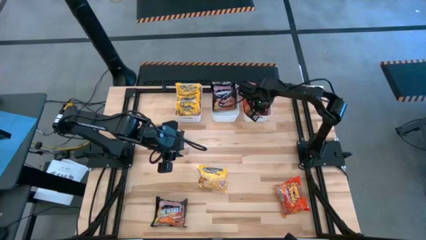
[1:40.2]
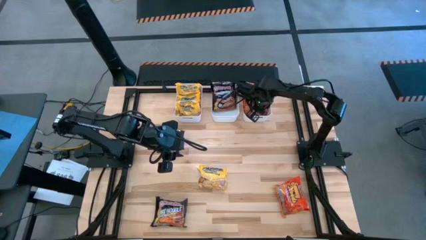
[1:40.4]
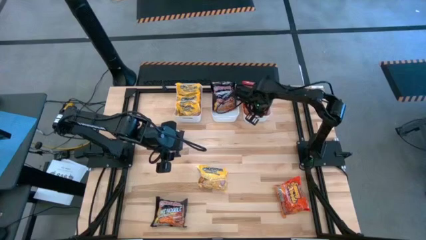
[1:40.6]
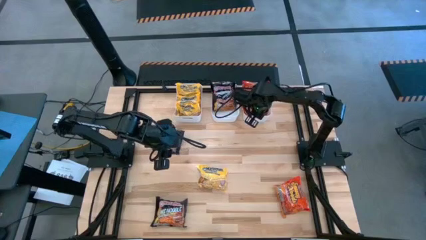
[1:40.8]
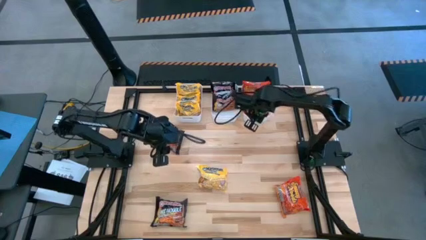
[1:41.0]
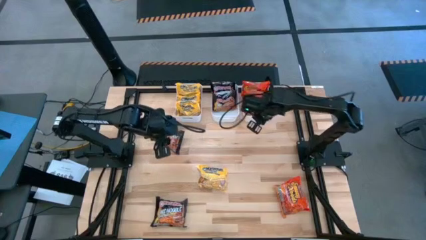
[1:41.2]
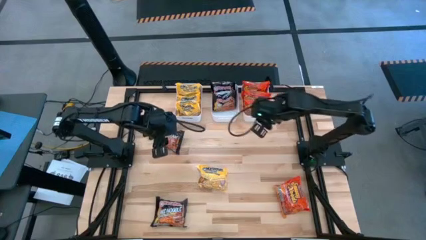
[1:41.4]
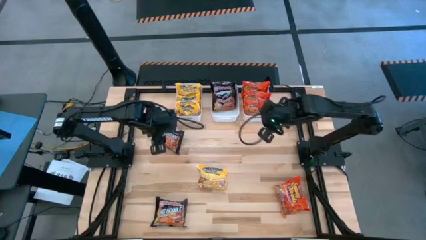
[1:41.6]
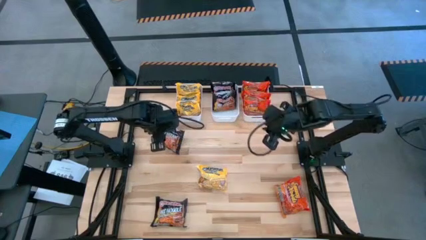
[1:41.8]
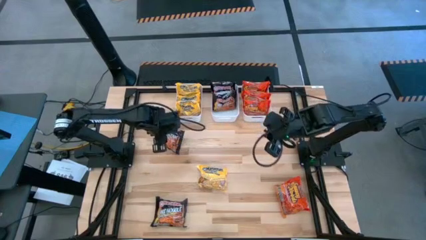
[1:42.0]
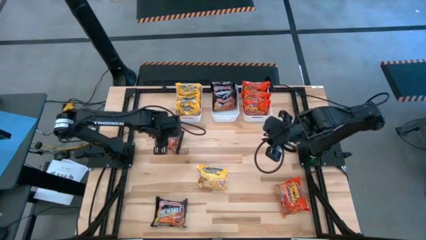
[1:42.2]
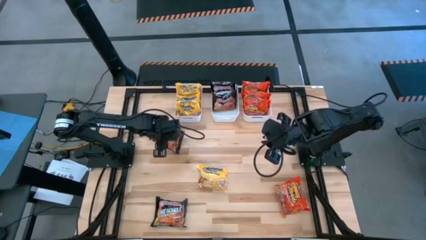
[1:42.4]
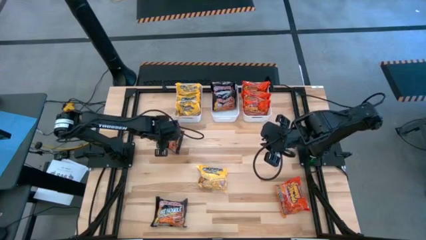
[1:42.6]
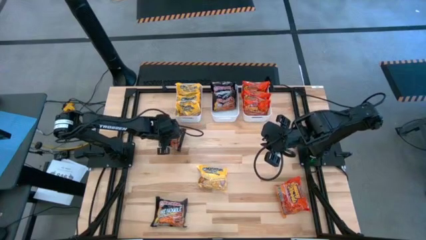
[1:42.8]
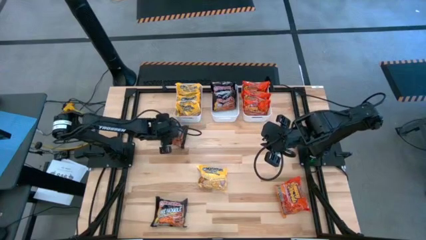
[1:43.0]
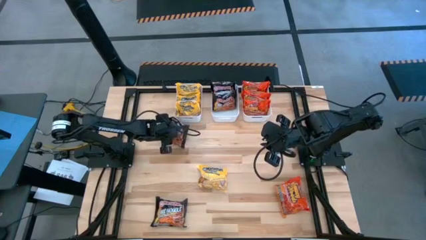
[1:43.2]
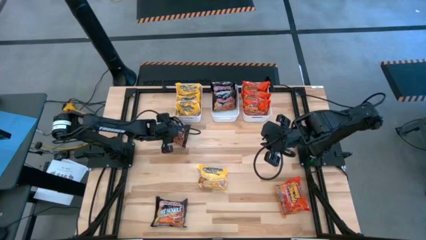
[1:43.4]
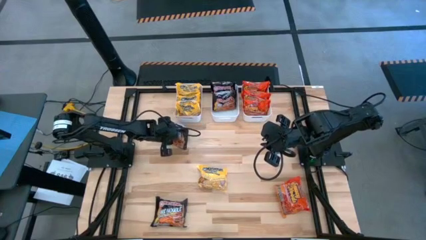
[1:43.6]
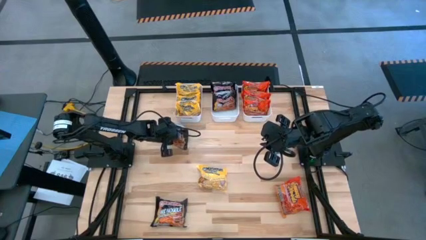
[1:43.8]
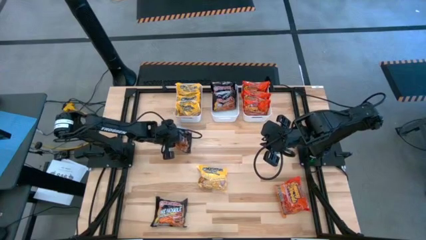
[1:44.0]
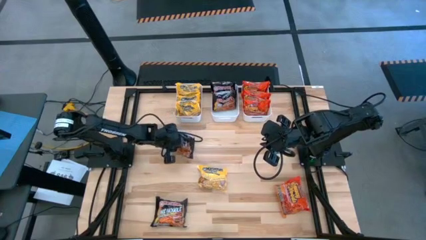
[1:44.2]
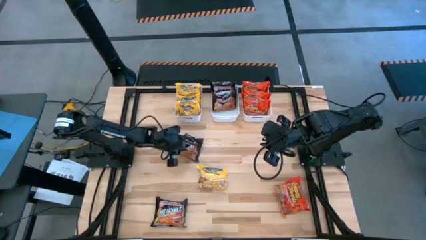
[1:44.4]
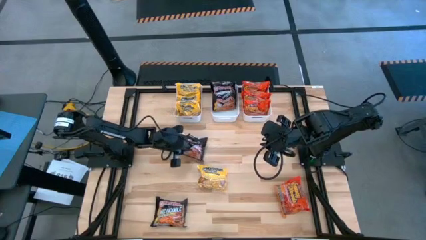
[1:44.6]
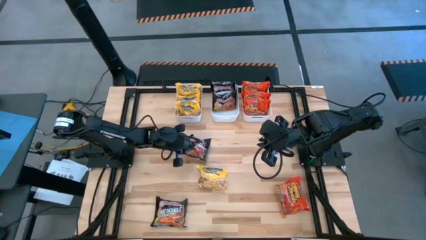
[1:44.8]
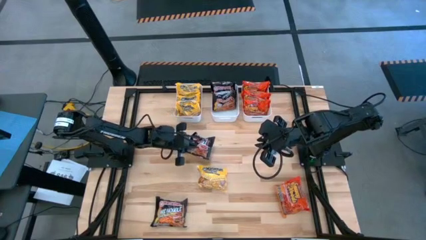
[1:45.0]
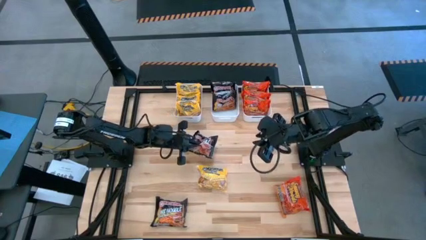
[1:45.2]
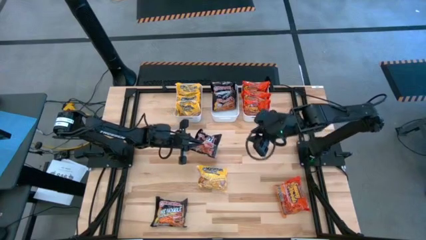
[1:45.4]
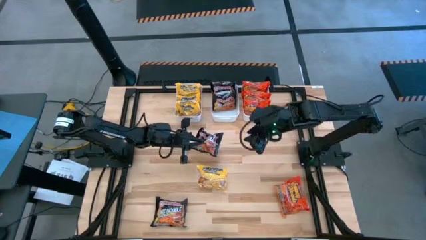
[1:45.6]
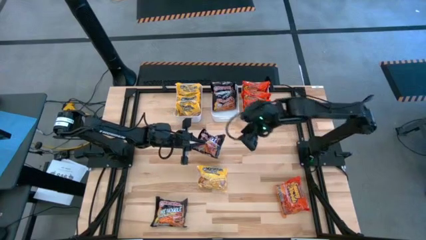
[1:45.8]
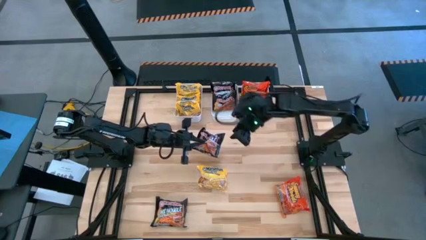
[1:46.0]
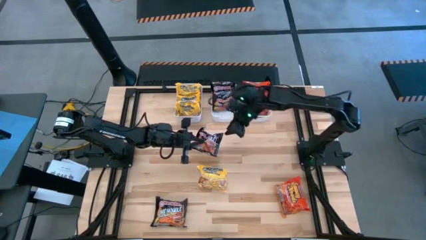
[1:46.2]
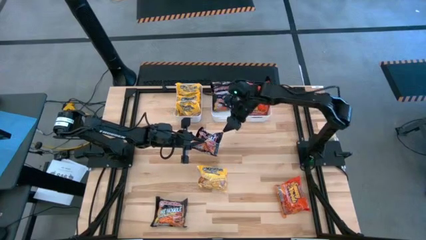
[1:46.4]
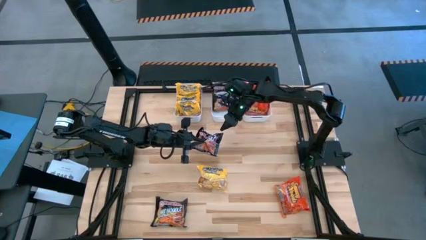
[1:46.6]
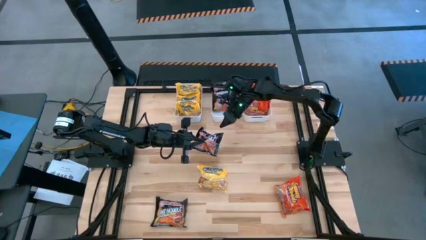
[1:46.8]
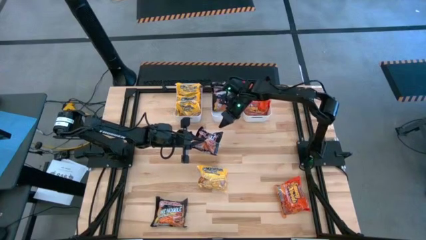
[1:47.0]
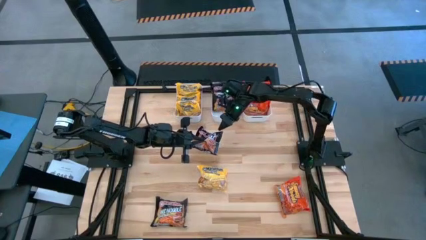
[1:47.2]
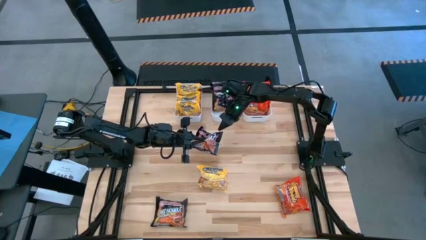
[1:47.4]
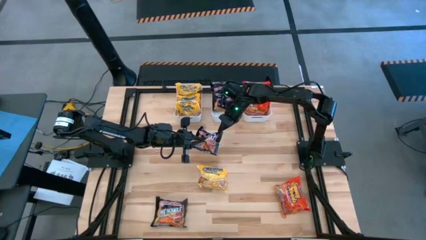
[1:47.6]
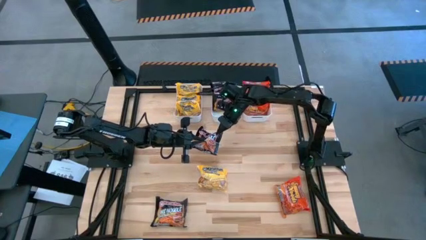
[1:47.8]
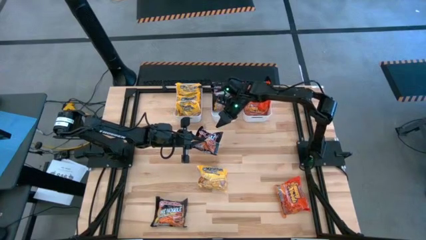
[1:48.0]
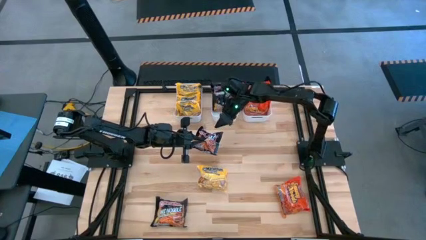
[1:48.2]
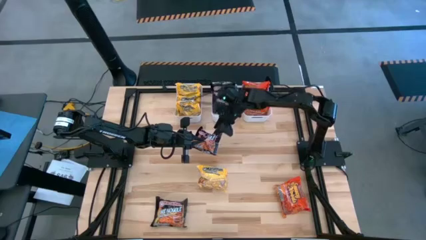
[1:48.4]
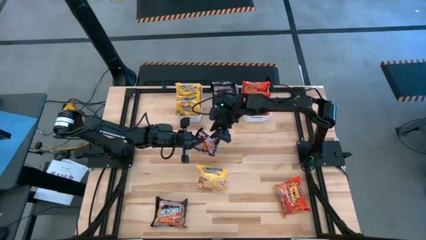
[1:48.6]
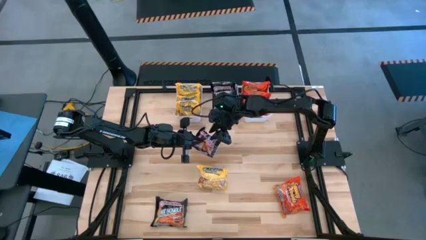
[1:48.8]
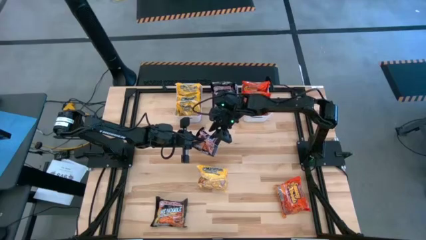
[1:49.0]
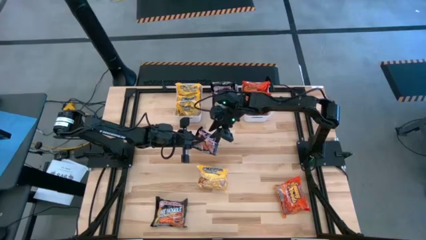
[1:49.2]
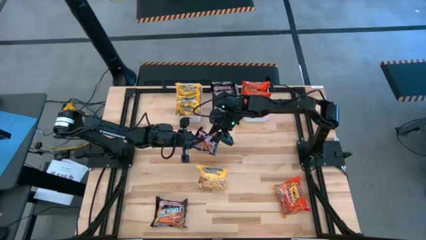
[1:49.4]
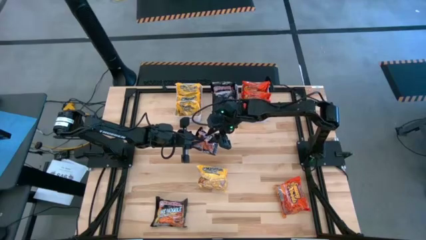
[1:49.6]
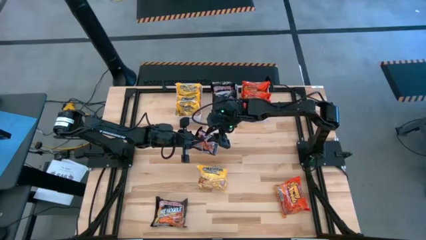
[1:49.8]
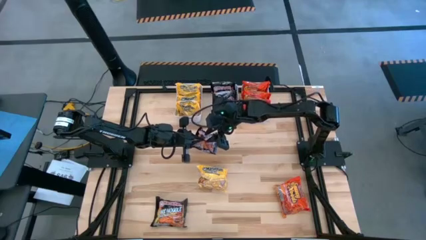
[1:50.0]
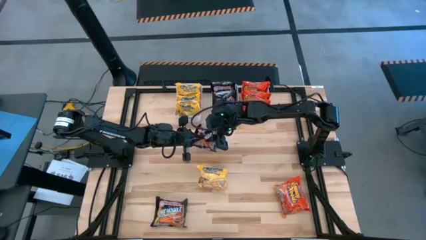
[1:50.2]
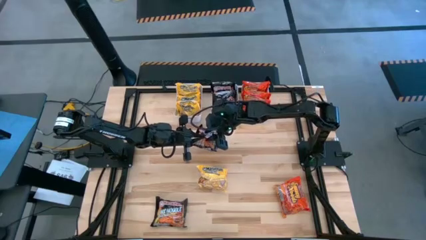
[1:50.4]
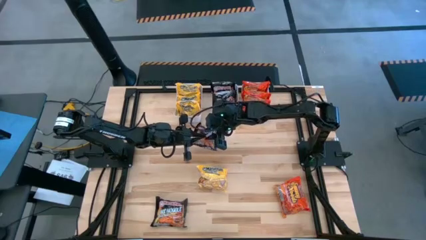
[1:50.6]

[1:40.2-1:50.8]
Task: Sort Maruchan noodles
Put the black noodle pack into the middle white bin

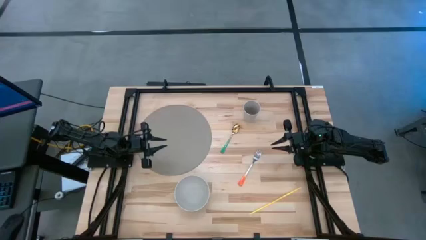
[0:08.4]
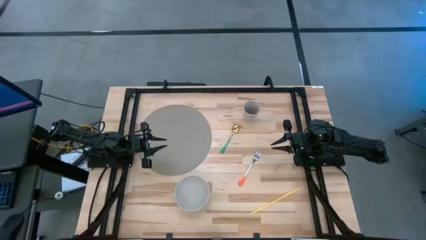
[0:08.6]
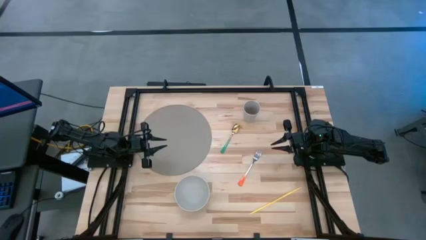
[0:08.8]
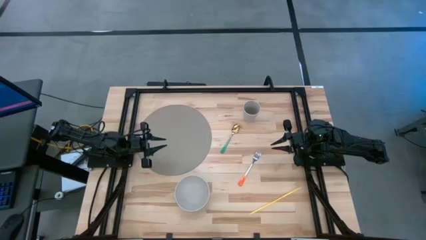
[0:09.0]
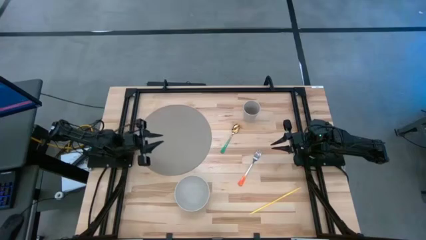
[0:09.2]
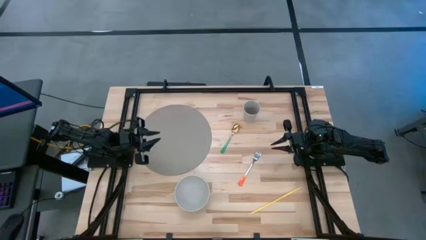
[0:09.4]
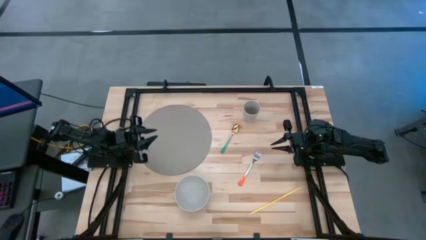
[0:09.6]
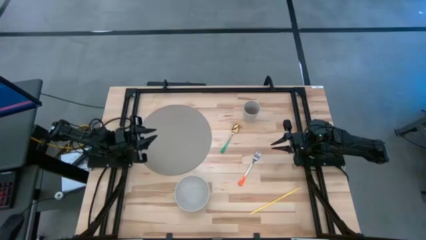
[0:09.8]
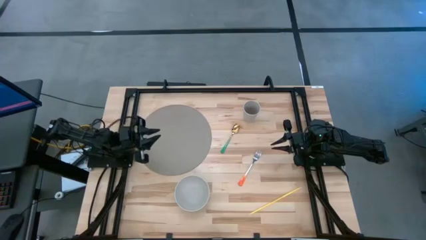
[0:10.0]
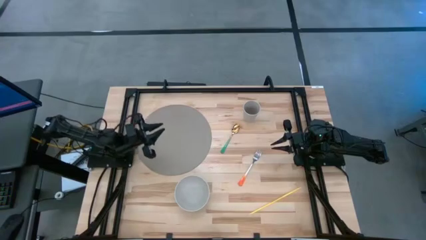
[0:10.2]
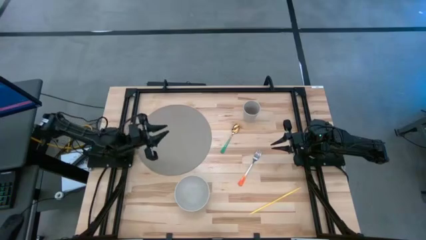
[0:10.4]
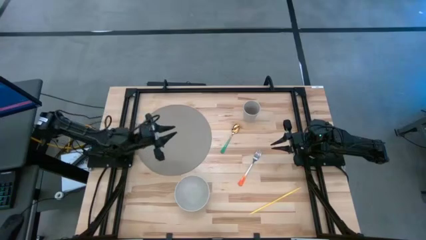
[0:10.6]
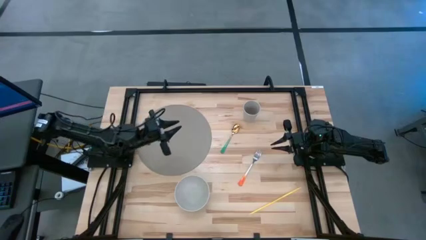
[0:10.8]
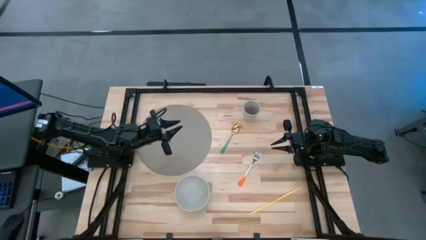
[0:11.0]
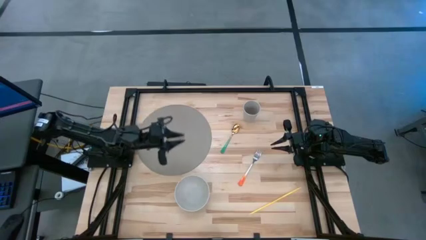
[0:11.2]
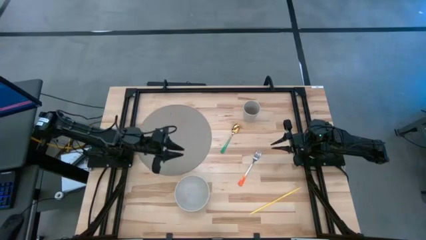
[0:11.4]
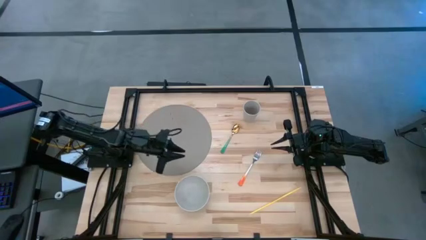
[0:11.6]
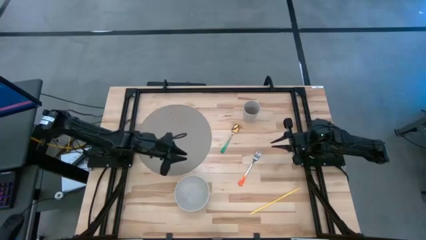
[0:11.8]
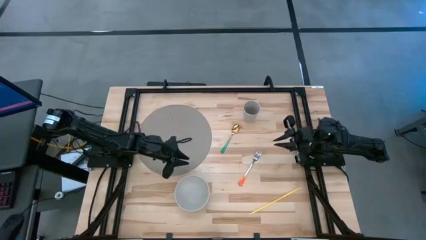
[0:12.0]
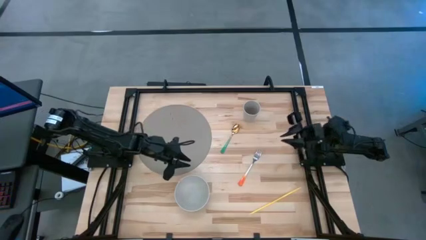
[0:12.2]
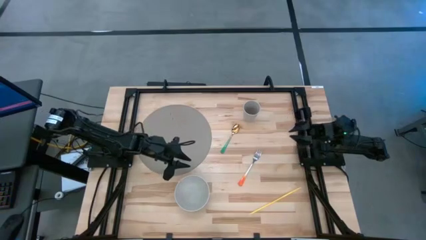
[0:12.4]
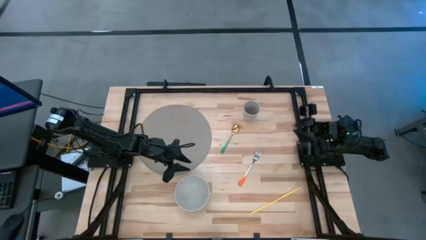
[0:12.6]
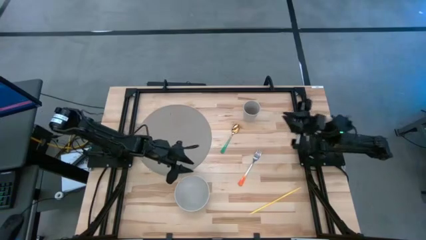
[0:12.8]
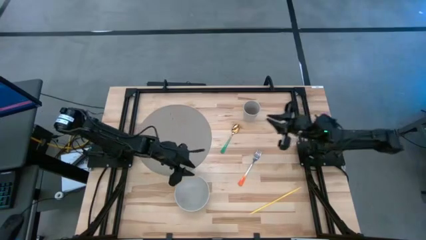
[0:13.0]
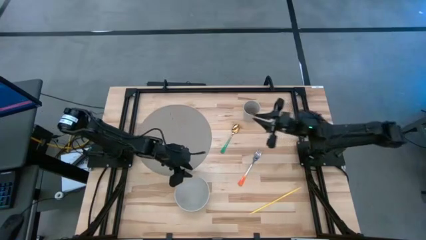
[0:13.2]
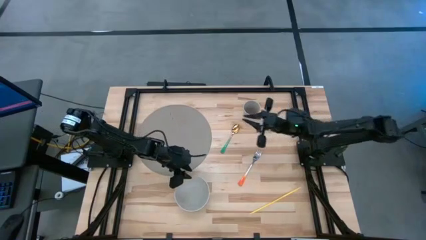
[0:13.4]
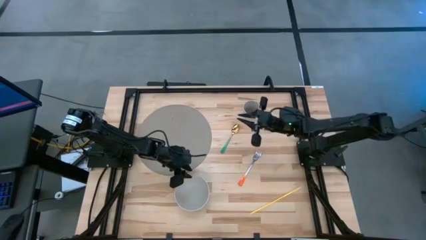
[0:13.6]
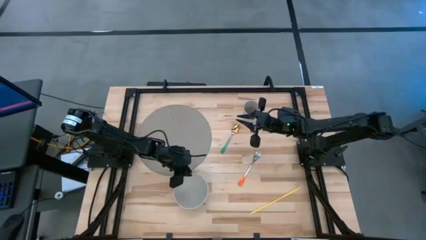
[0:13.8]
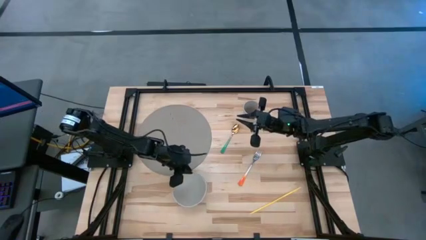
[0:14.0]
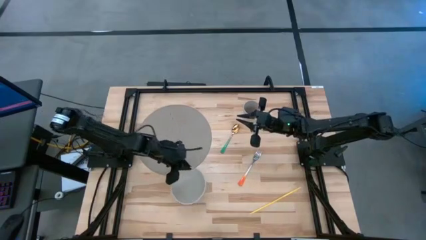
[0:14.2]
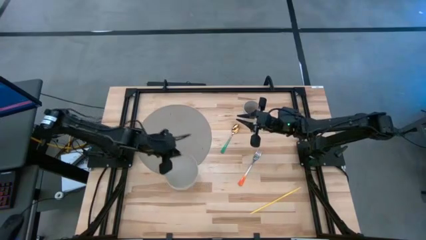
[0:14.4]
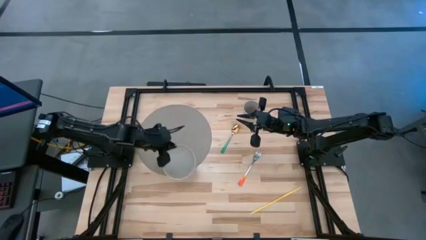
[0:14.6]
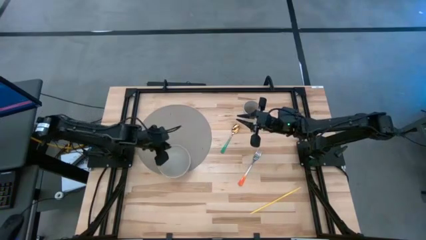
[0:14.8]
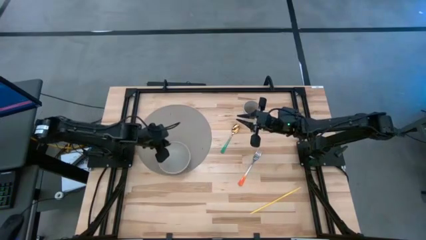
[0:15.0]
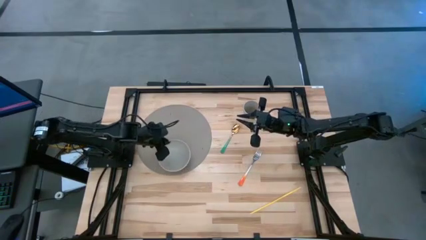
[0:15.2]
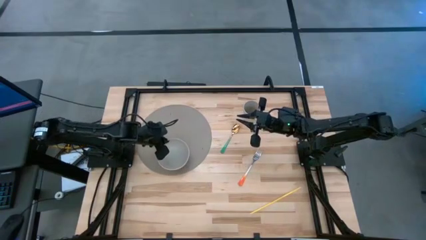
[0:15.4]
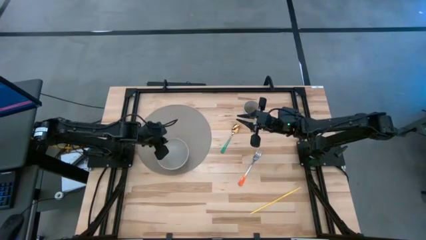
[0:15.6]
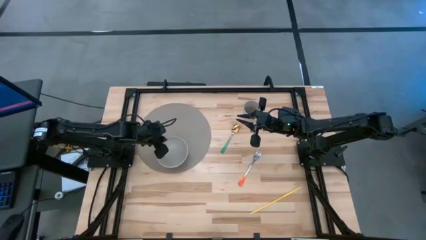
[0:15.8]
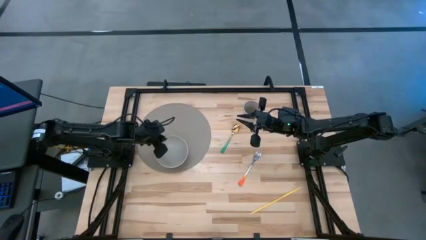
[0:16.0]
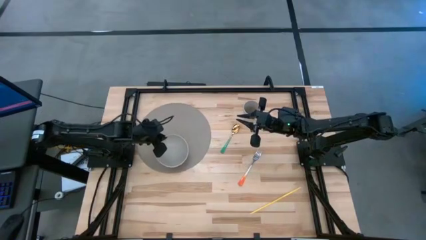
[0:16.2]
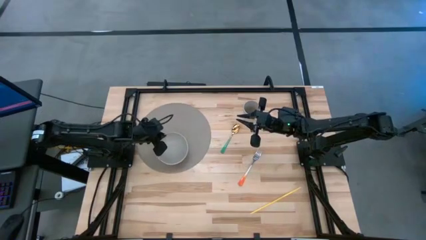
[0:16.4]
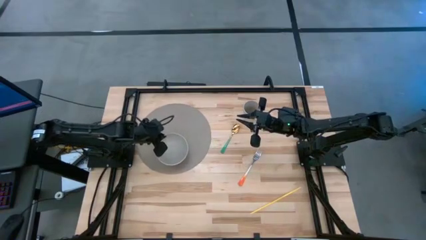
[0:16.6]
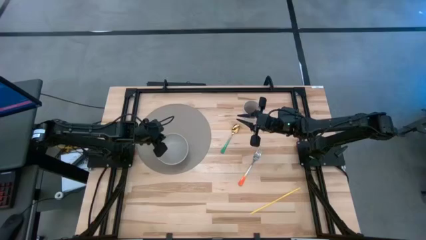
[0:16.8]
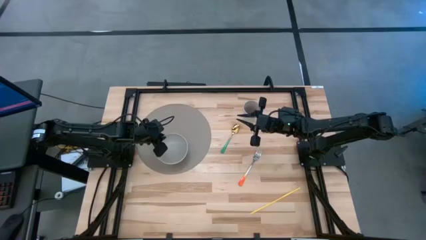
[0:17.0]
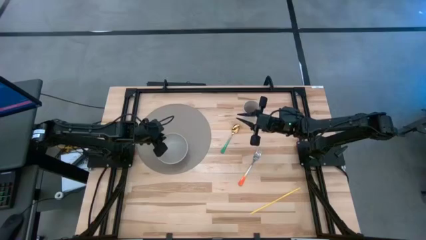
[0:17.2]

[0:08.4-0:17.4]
Task: Pick & Place Utensil
Put the white bowl on the bottom of the gray placemat
